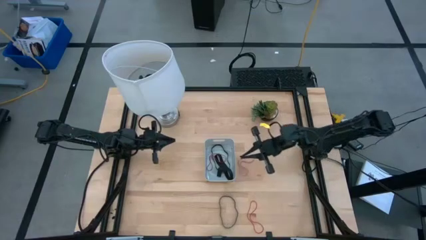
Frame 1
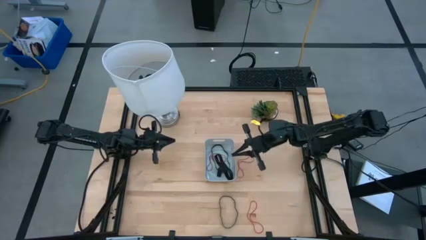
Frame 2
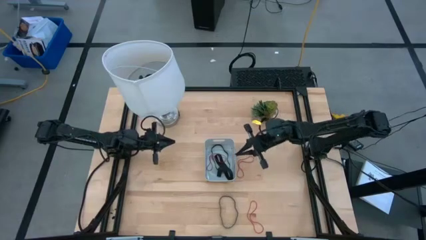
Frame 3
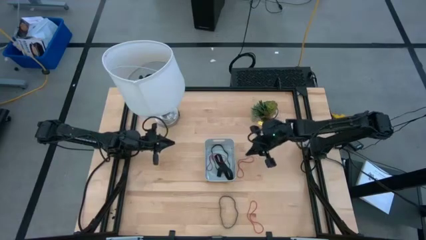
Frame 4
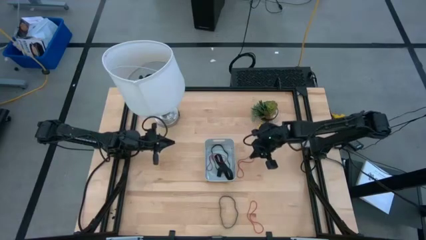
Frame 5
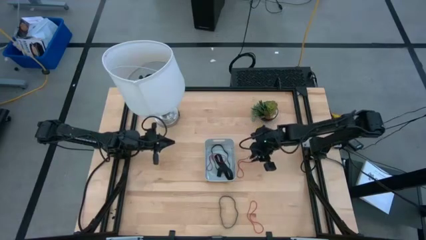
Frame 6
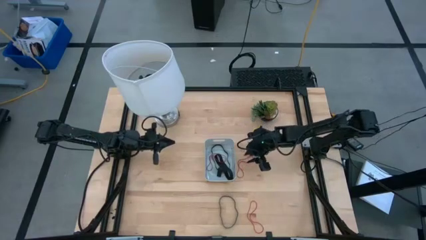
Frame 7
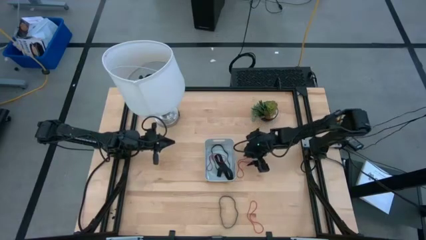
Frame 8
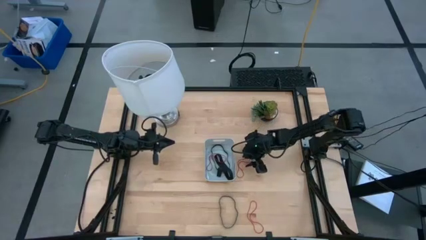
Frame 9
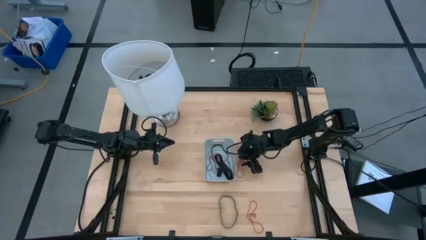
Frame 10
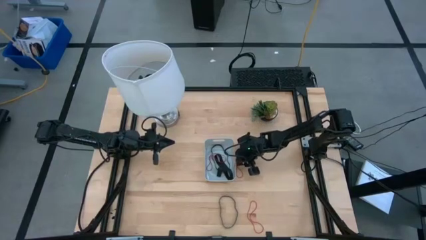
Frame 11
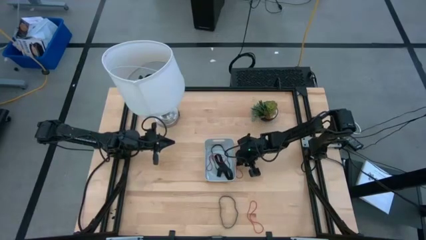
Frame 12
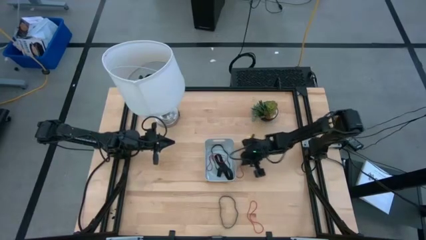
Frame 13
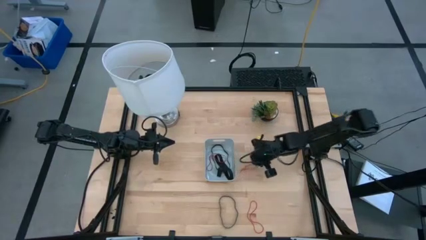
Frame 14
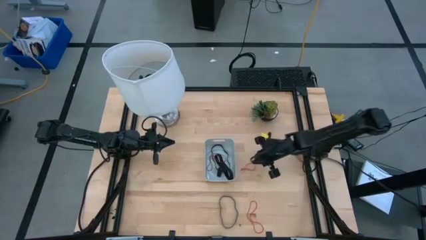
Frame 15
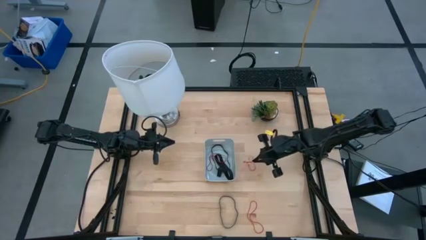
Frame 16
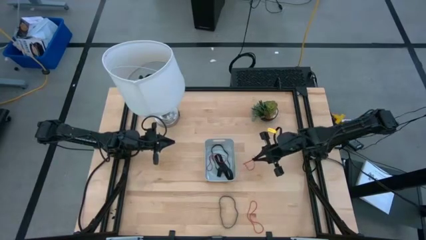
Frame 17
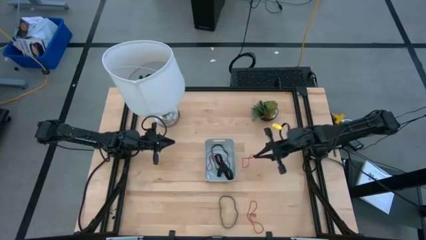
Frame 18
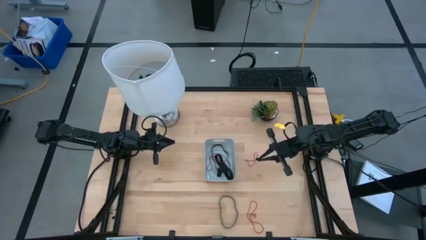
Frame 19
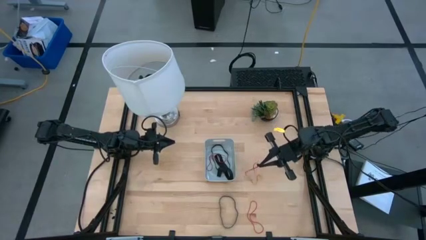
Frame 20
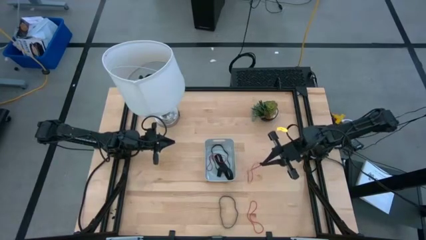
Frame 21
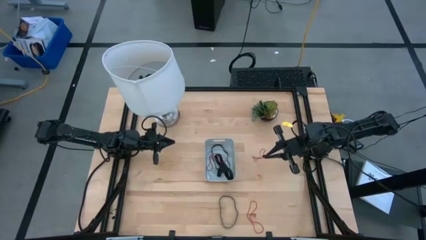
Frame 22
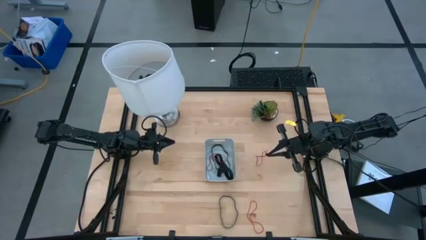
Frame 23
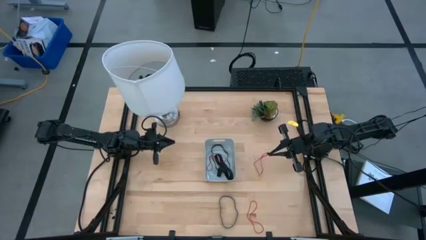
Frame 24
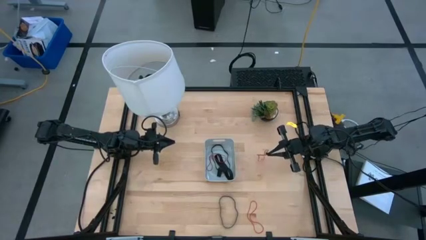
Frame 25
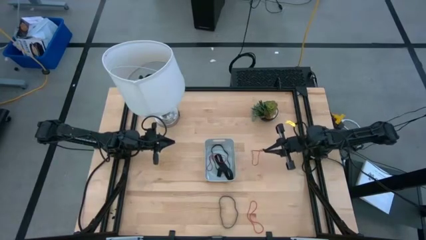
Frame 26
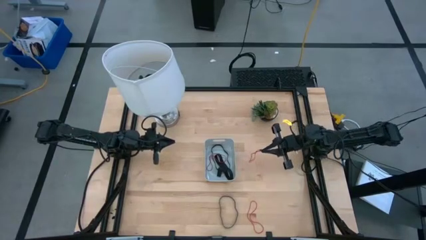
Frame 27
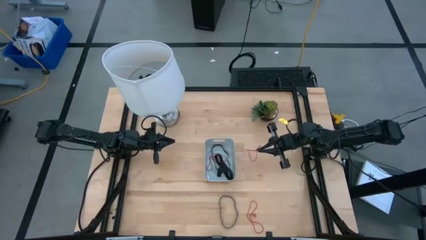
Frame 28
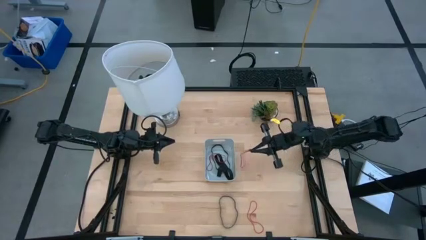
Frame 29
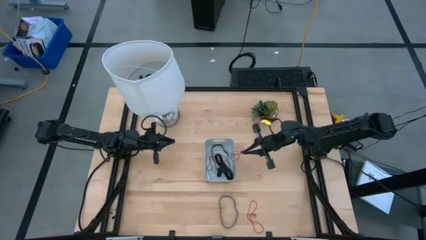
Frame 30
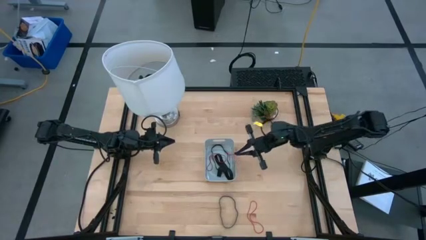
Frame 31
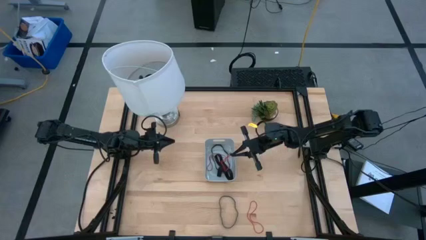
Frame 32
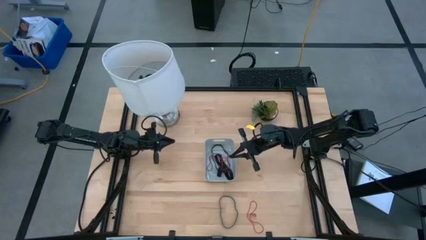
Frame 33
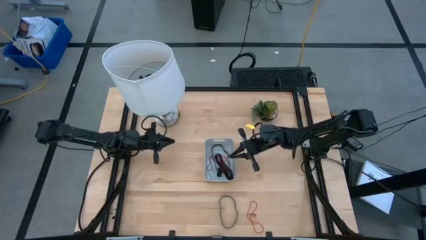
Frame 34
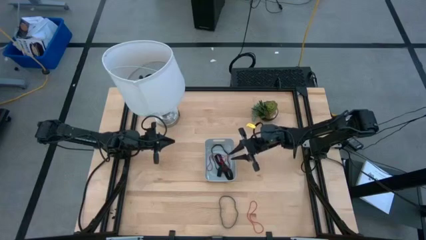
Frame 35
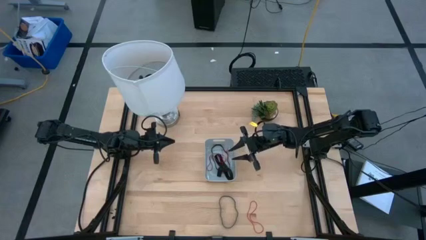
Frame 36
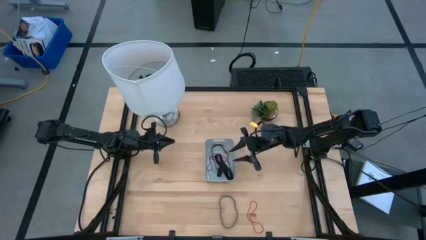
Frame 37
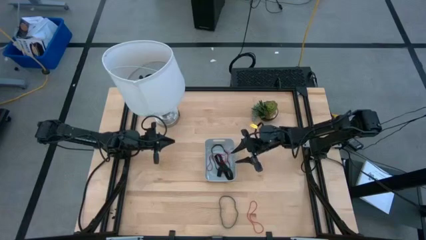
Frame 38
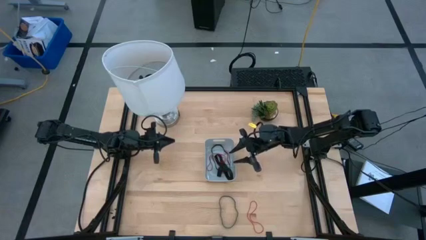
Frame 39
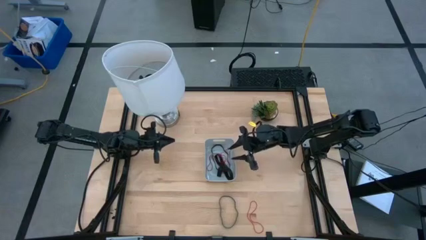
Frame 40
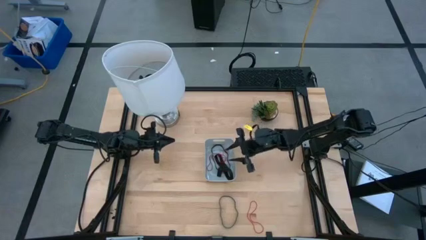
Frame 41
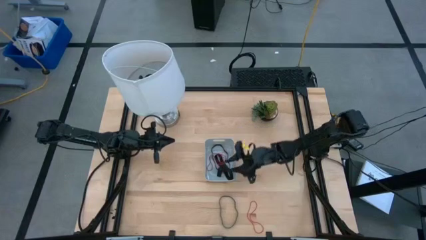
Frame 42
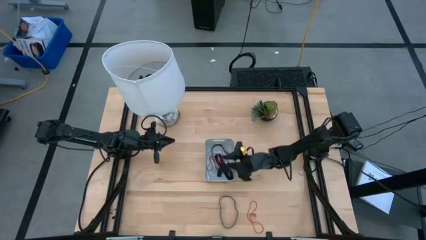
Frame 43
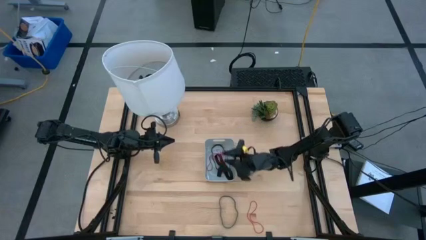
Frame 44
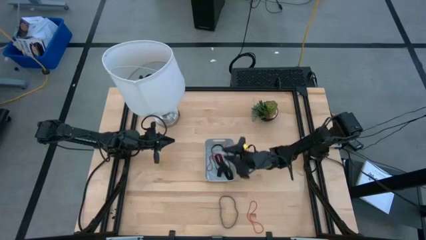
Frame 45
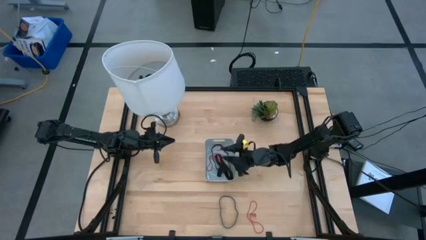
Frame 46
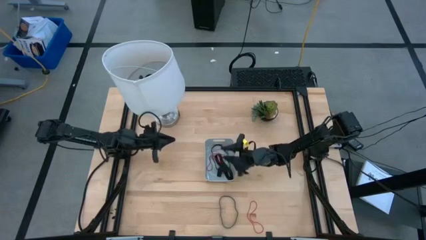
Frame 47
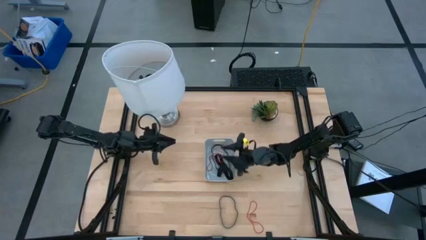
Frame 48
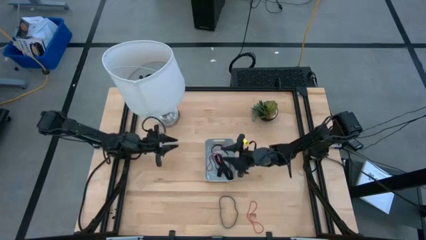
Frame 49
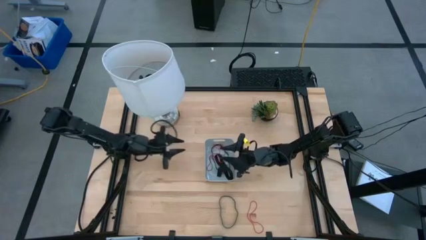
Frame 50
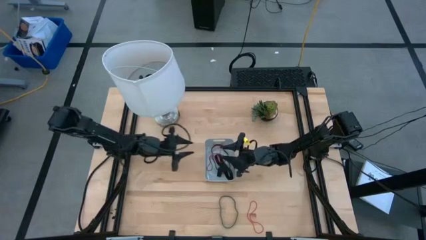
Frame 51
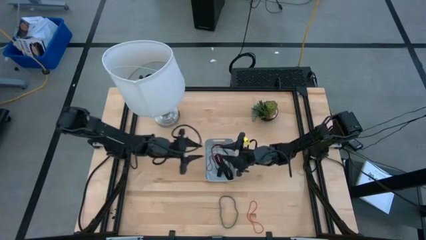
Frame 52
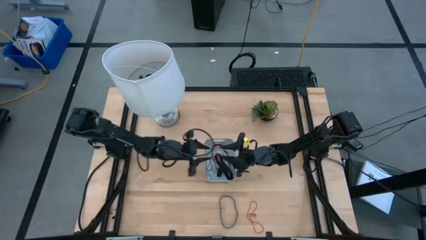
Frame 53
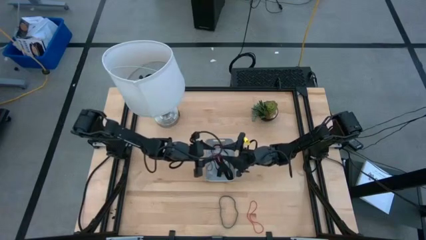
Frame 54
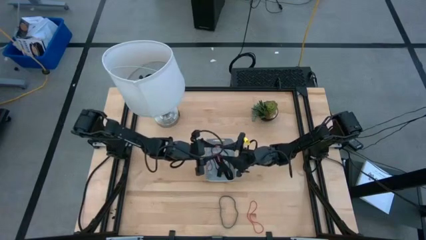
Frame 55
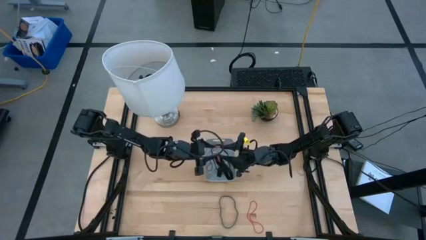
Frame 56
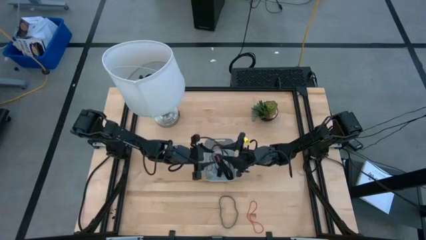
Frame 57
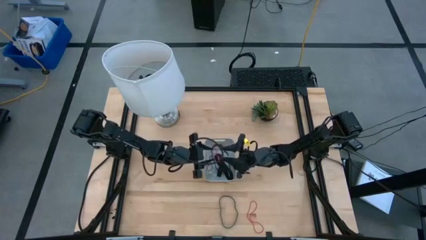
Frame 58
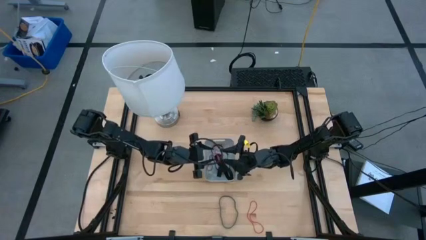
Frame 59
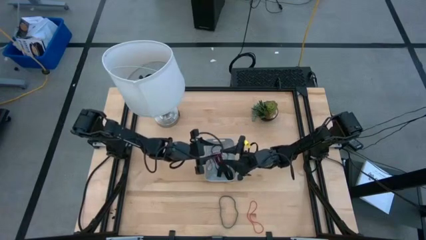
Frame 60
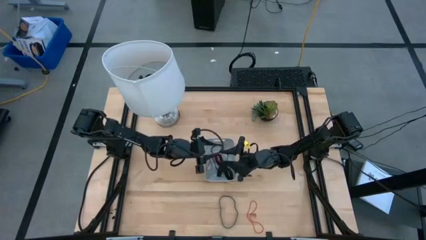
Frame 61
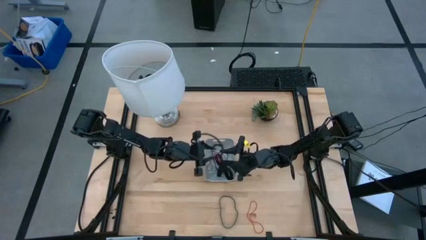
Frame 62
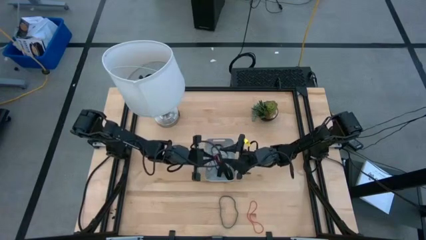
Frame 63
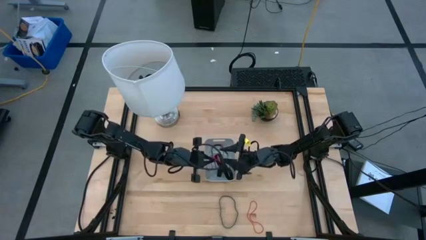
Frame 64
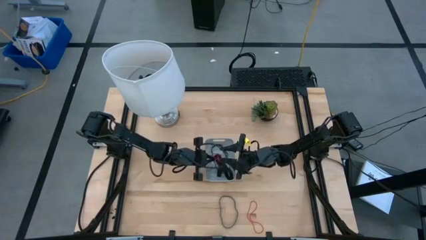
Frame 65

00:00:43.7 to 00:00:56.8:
Task: Pick and place rubber bands into bin
Put the top red rubber band into the gray bin

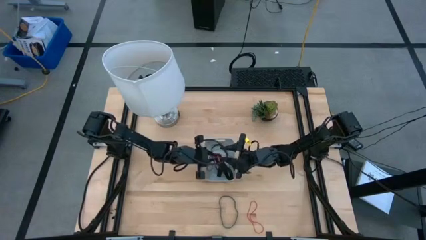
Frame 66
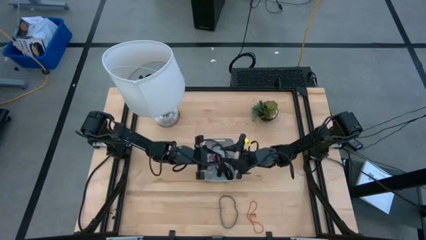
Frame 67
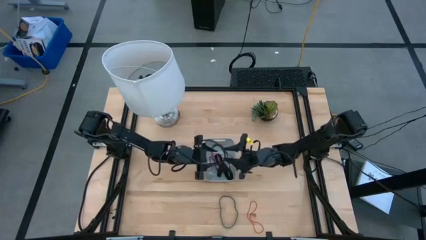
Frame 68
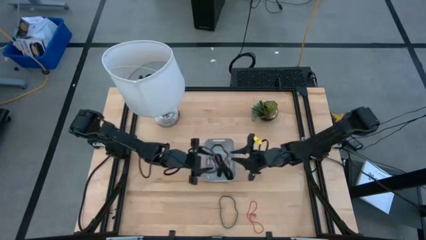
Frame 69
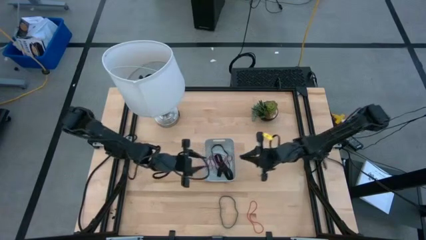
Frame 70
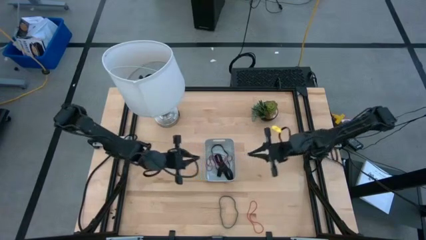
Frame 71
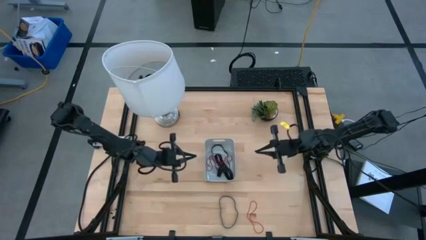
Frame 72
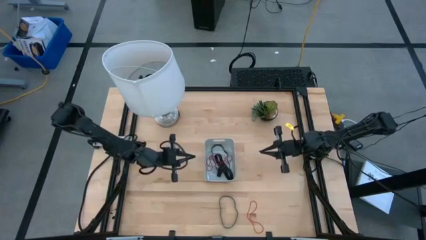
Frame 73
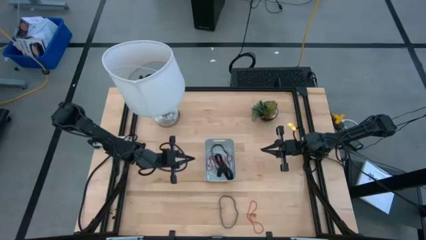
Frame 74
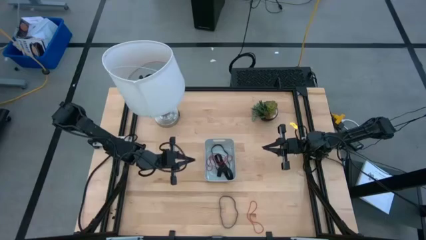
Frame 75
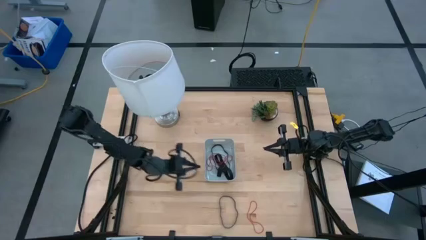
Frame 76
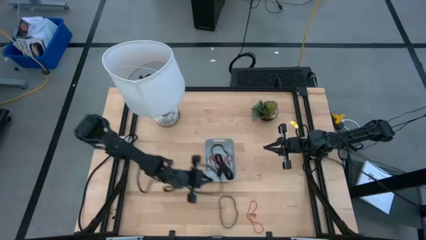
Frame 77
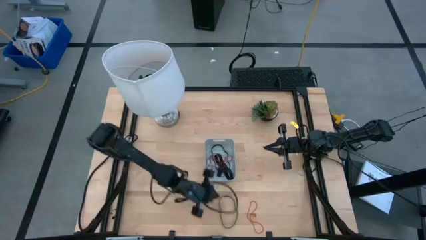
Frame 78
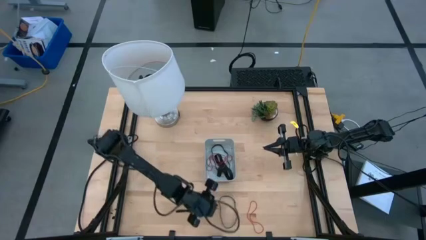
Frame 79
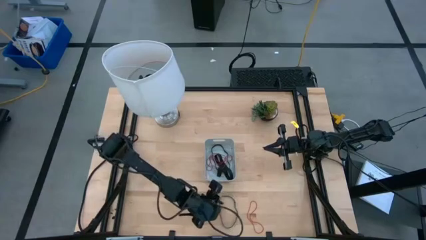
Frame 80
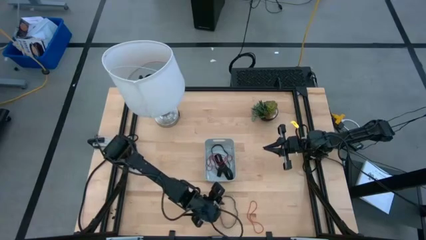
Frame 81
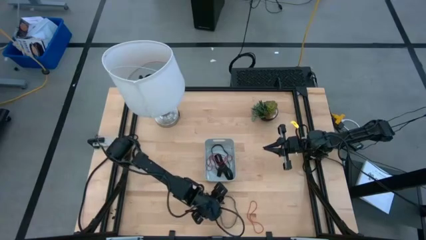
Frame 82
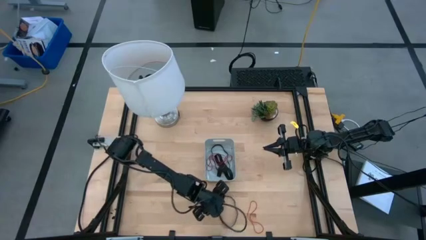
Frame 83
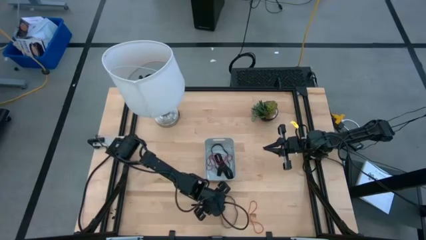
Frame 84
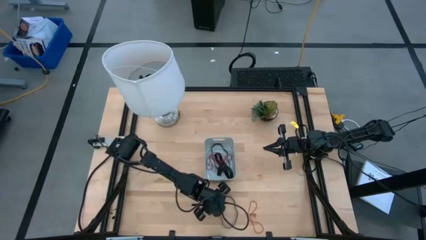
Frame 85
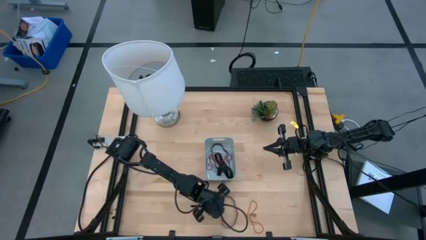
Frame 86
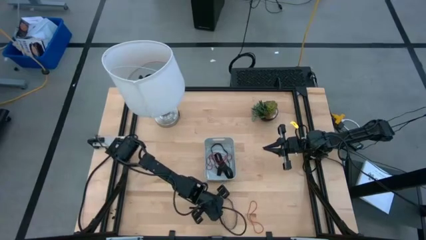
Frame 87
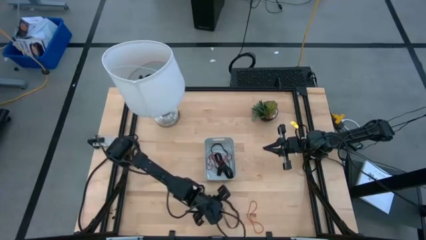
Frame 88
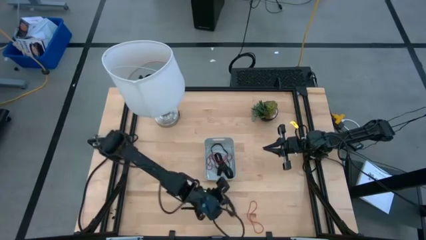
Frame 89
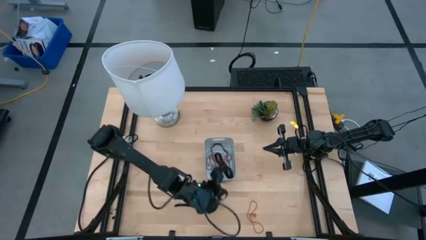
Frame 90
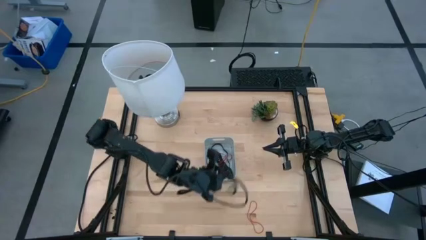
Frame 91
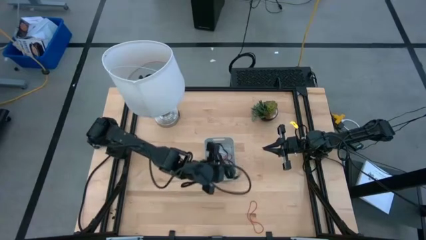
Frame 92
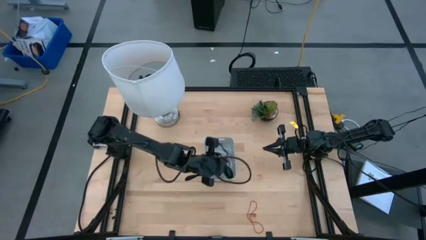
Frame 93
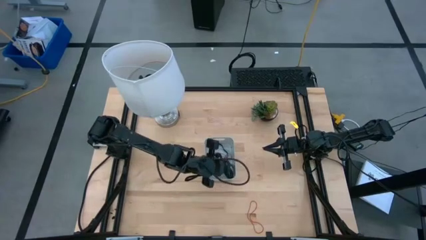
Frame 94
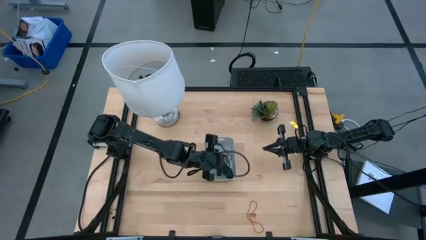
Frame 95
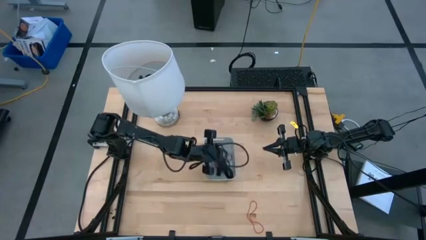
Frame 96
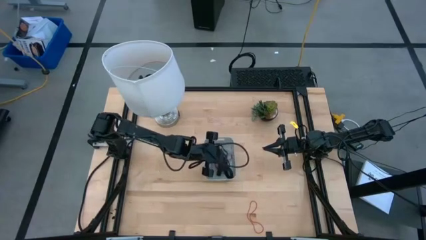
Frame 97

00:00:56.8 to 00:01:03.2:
Put the large black rubber band into the gray bin
